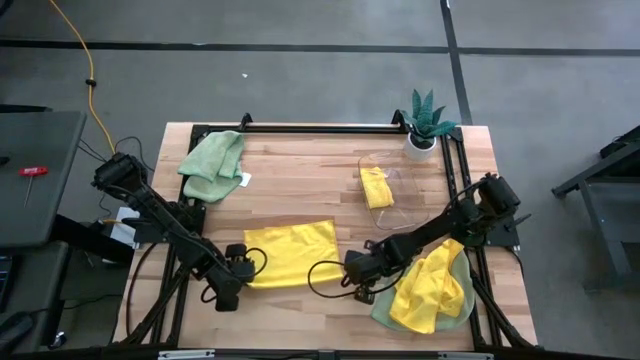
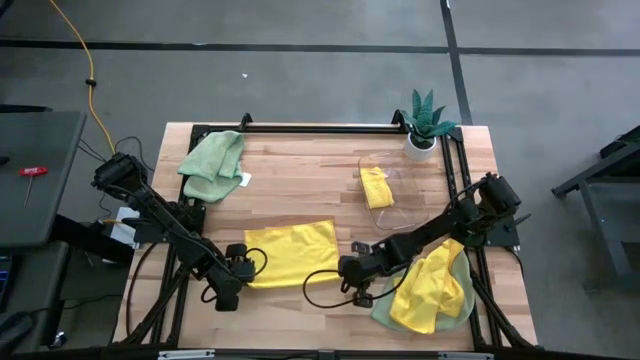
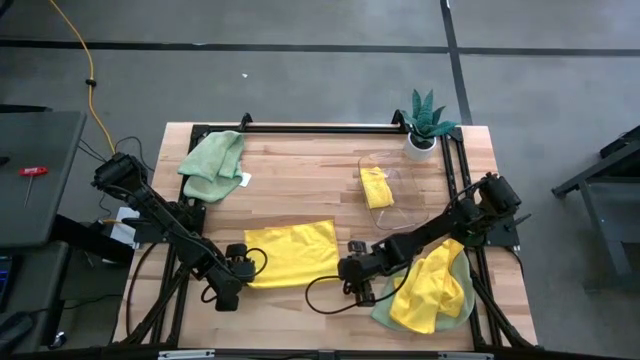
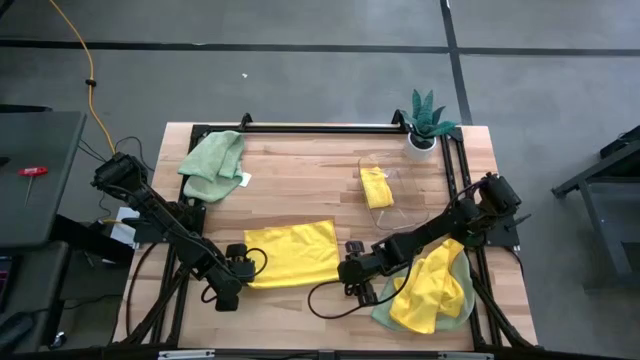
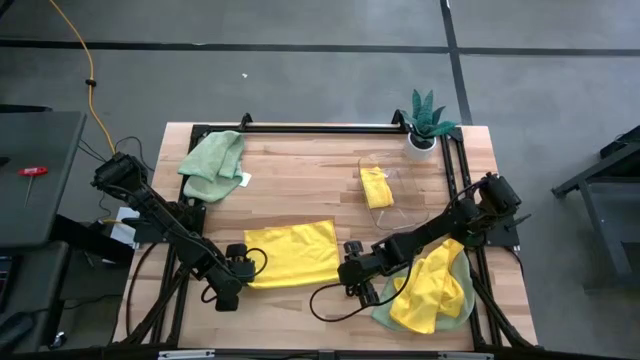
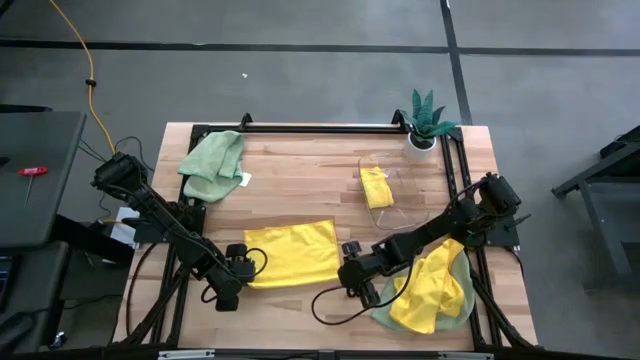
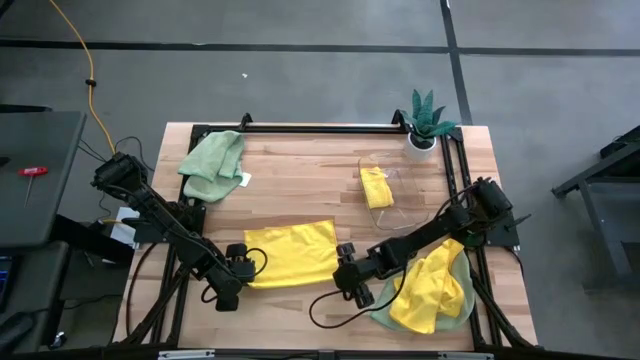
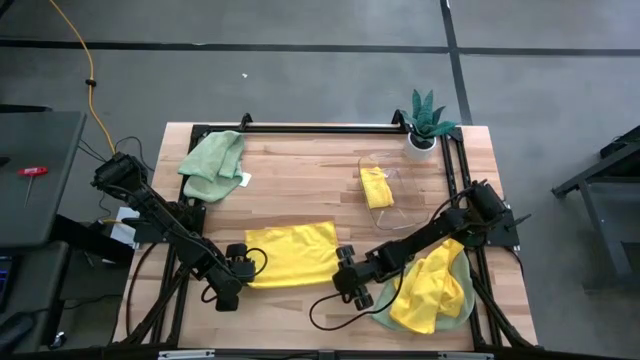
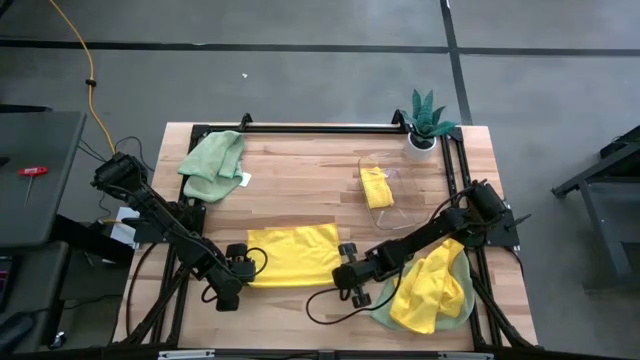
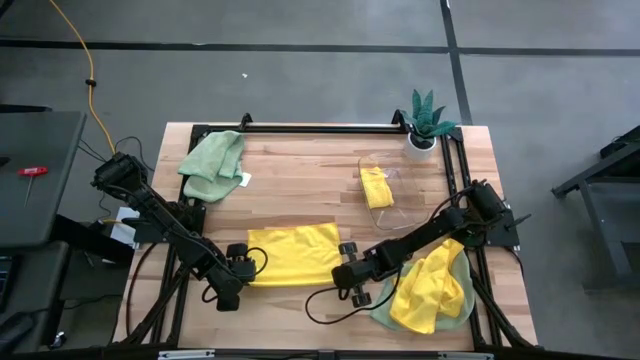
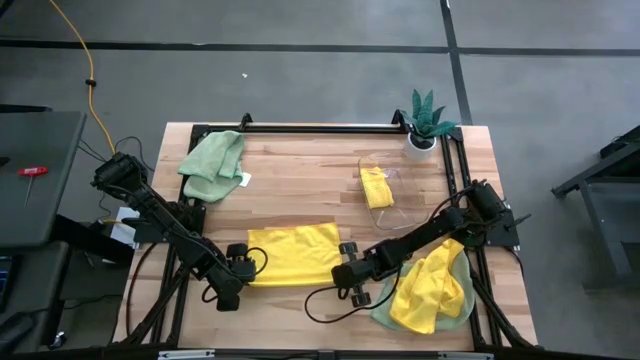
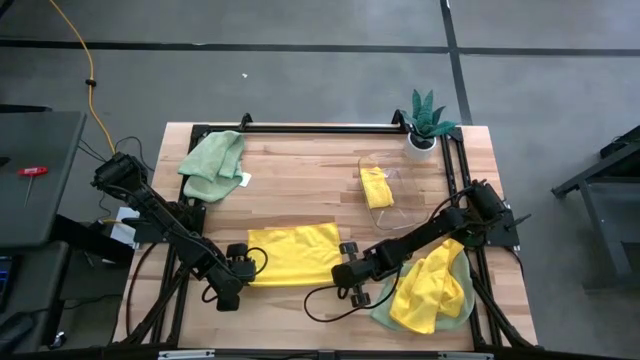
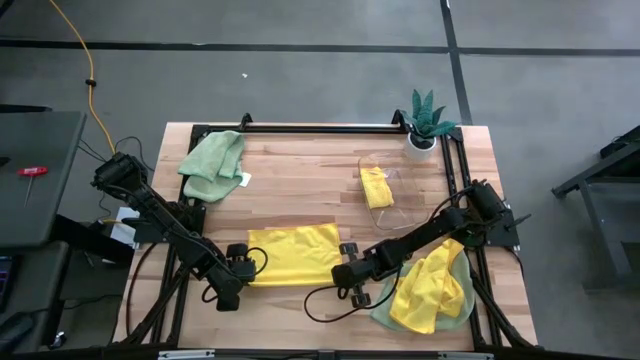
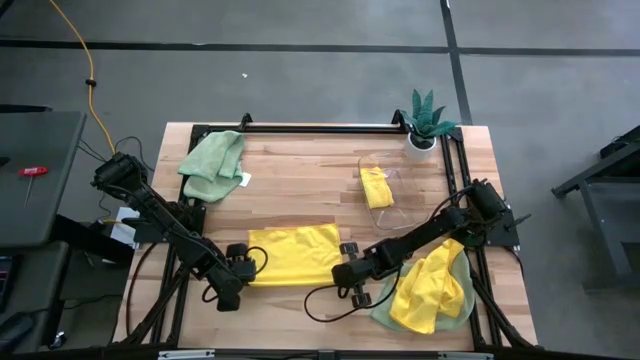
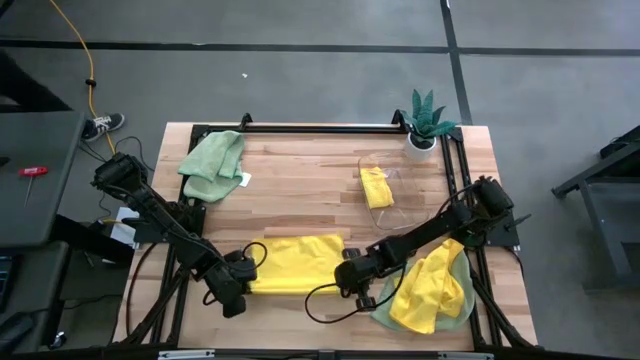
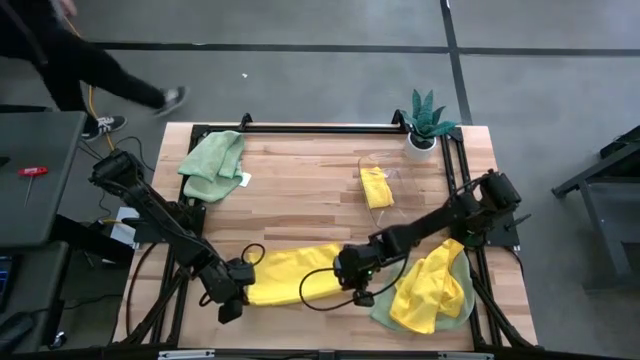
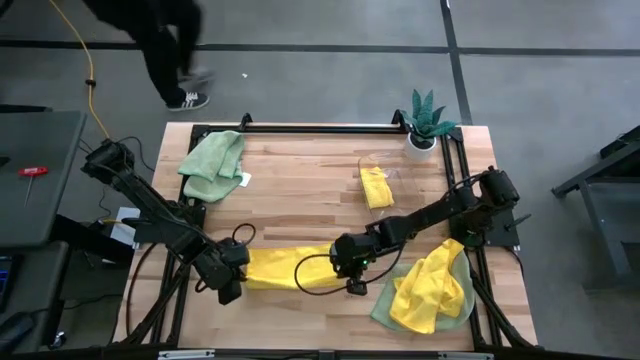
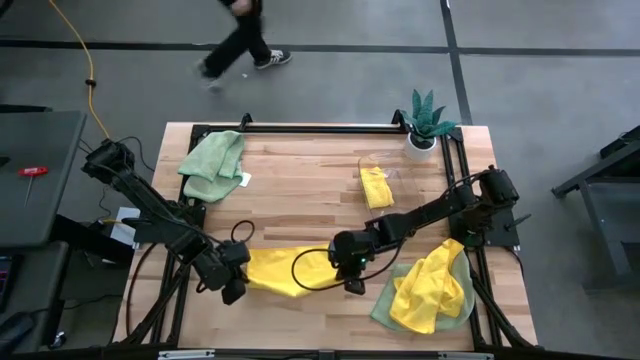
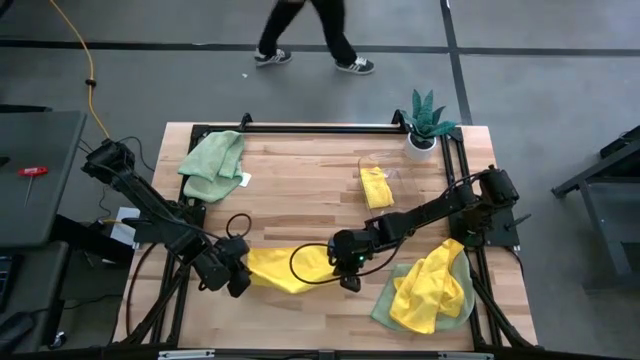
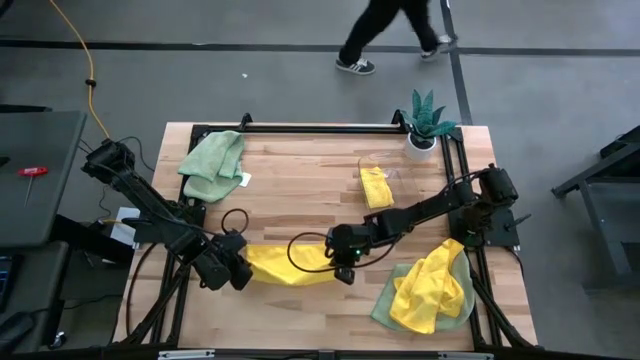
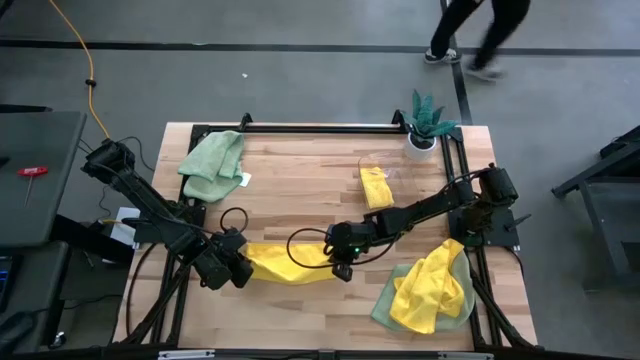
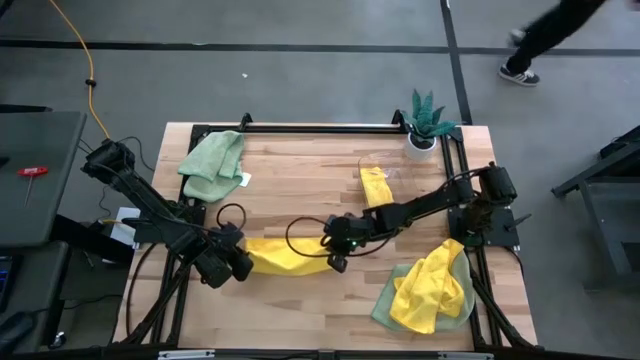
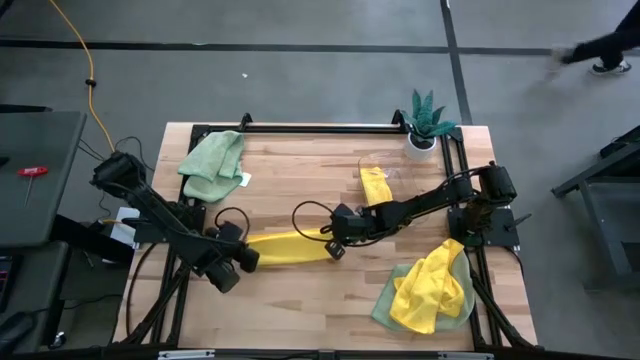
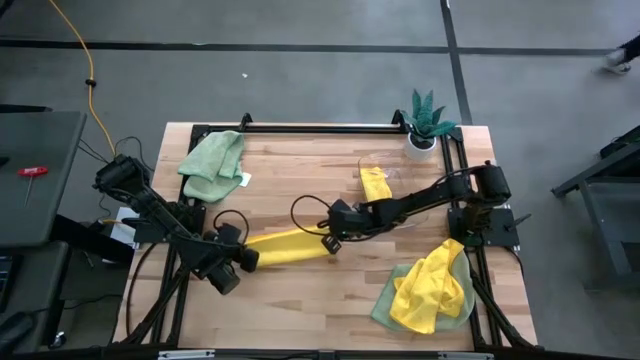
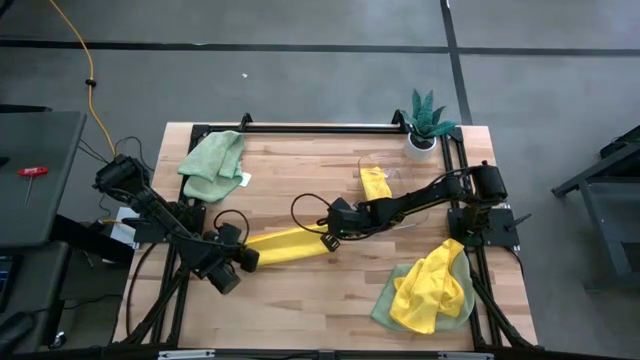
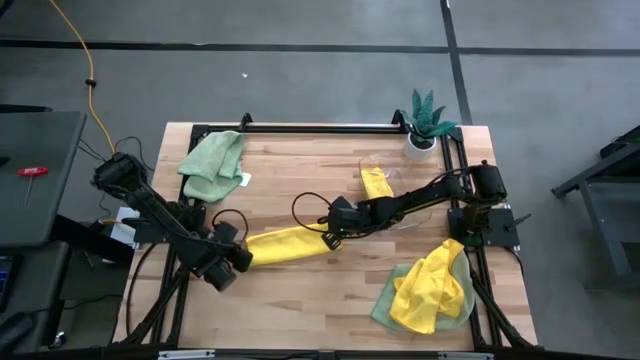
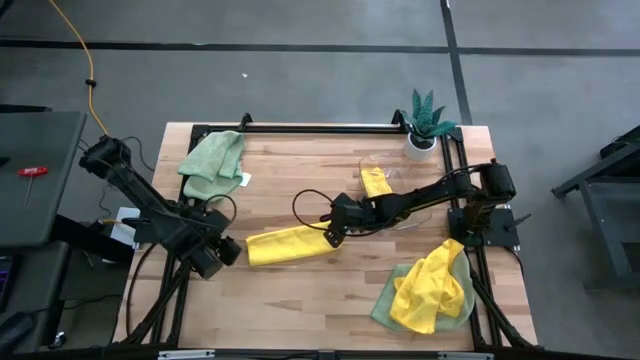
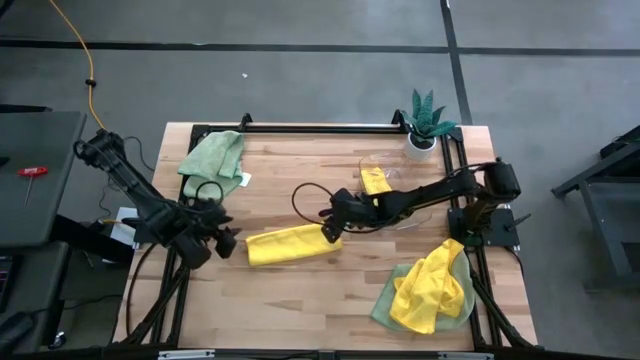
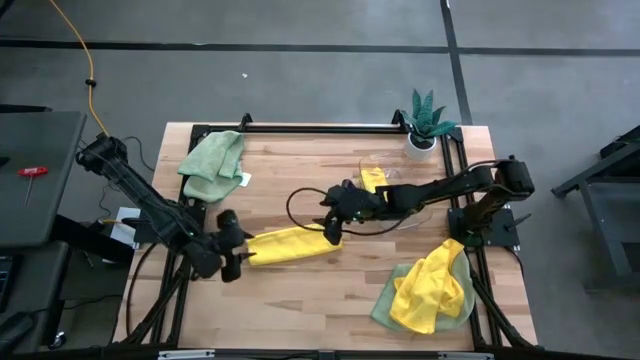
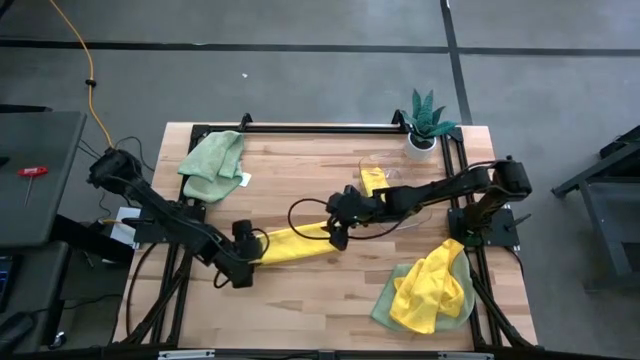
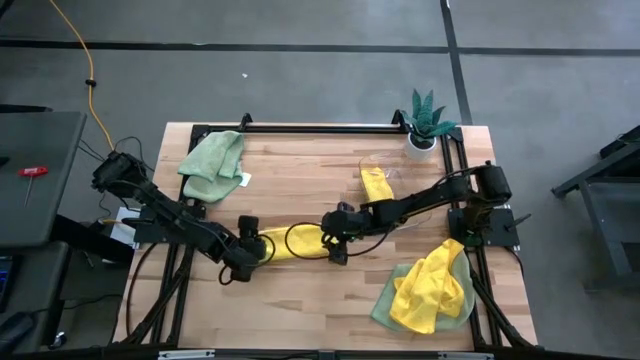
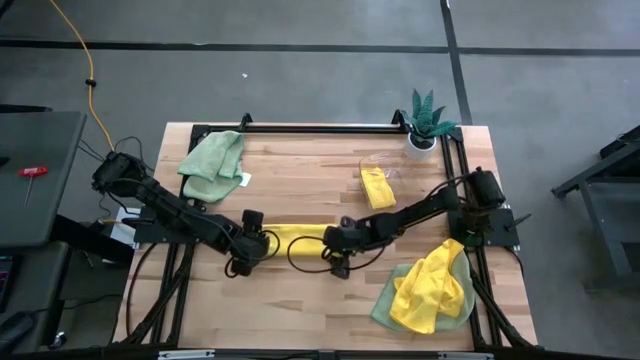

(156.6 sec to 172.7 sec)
Task: Fold microfiber towels
Fold the top yellow microfiber towel

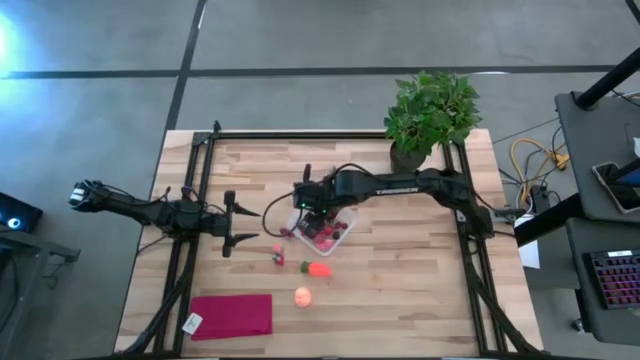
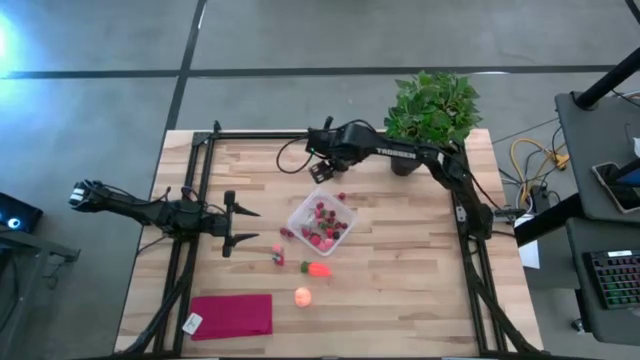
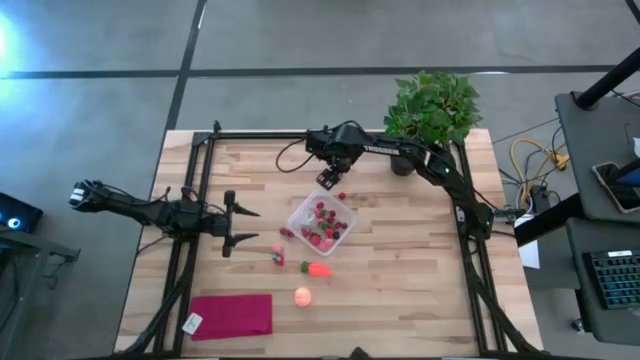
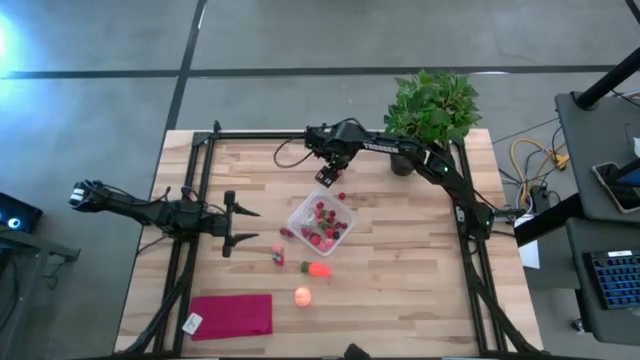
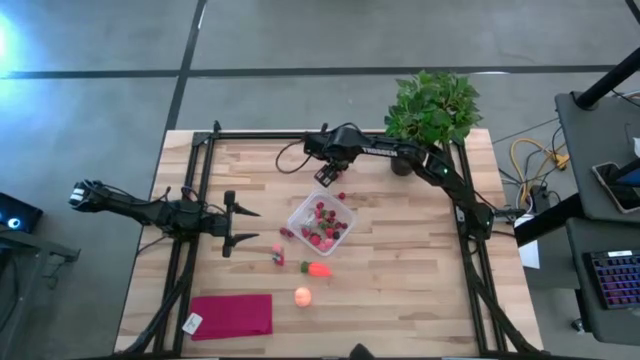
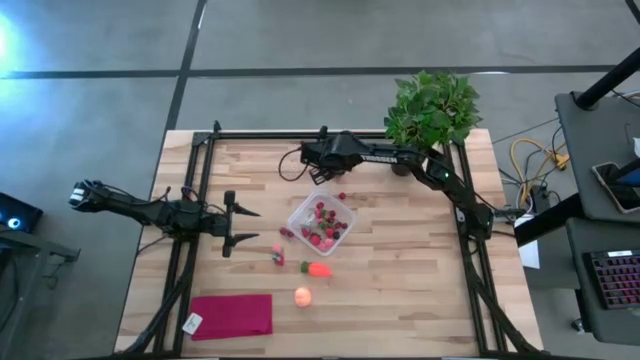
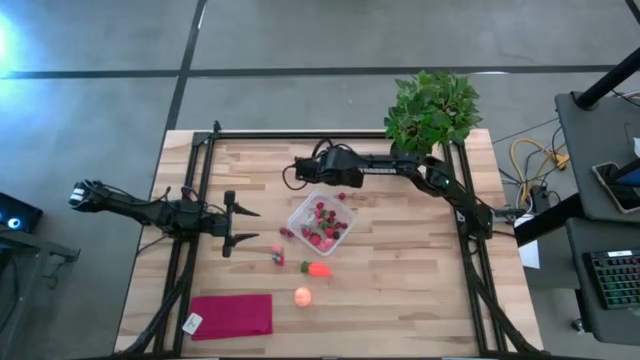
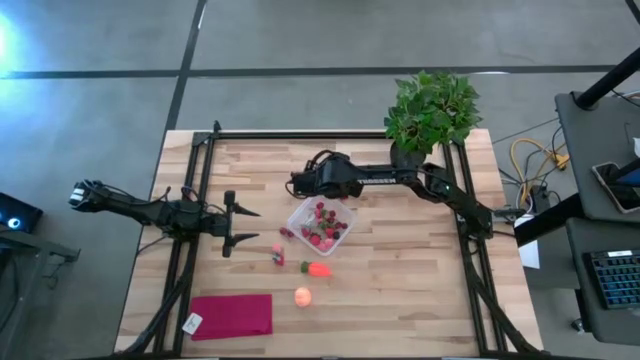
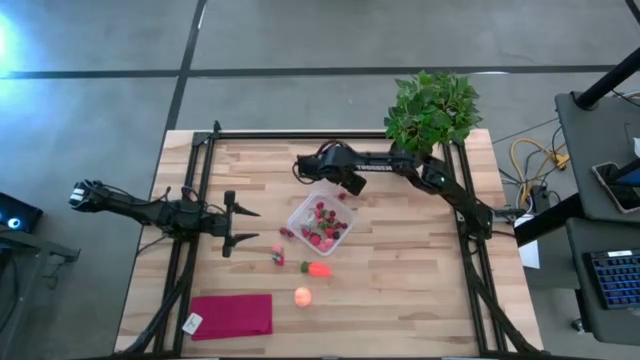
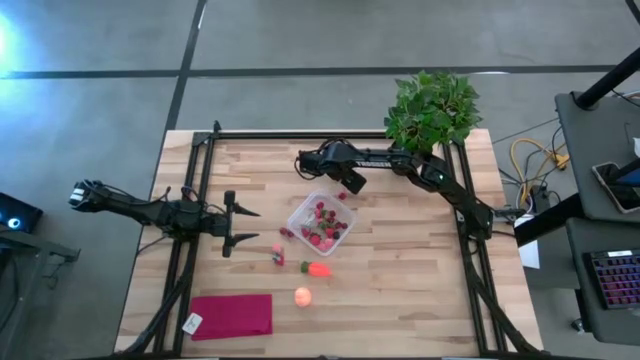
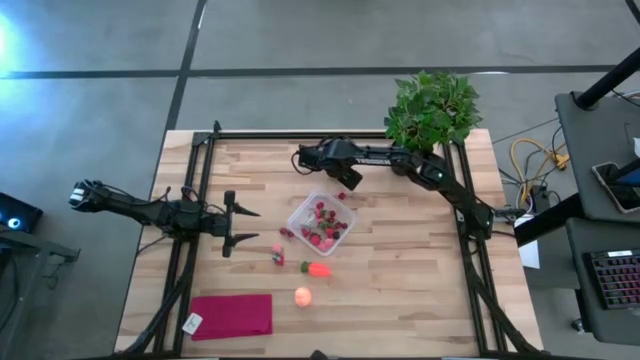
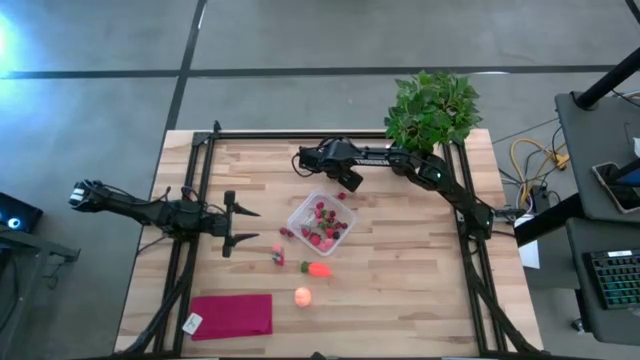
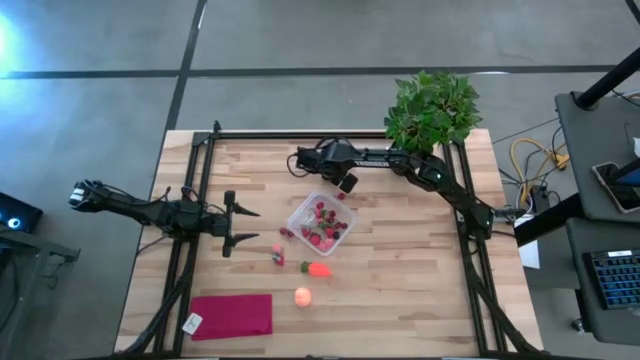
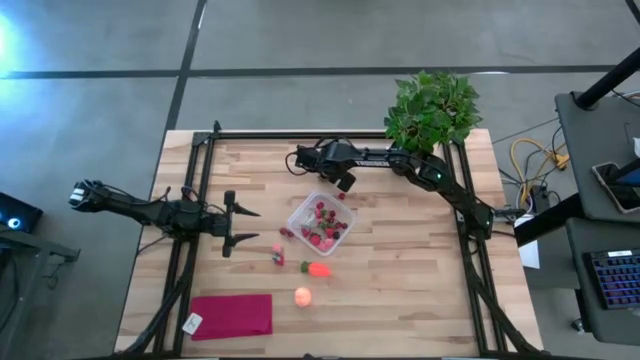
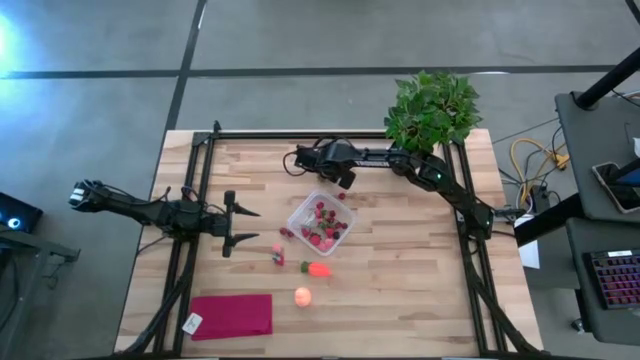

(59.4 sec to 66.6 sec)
Task: Pick and placing Produce into tupperware
Put the red strawberry into the transparent container
